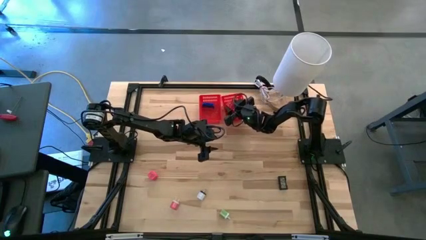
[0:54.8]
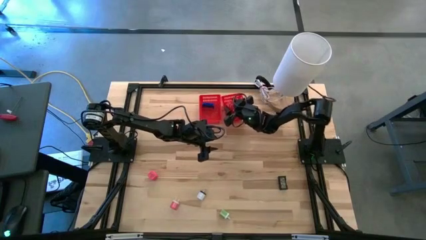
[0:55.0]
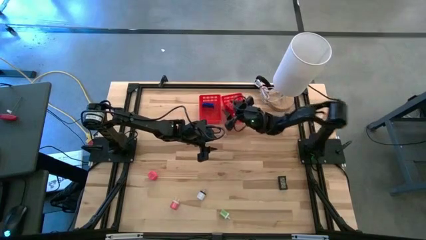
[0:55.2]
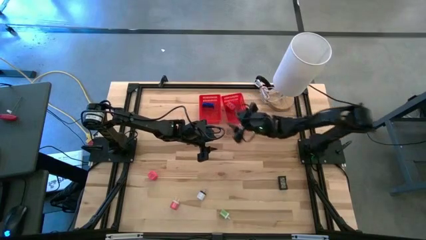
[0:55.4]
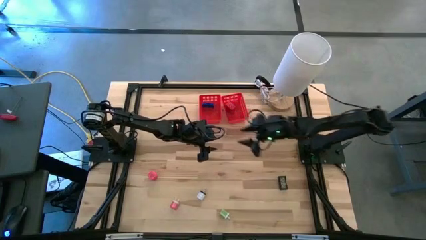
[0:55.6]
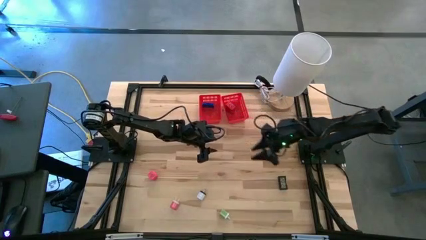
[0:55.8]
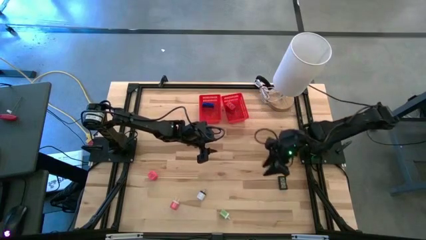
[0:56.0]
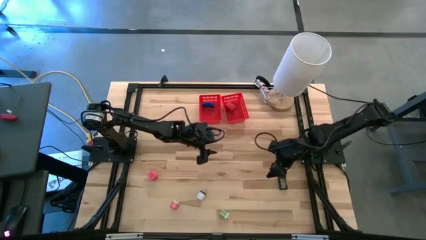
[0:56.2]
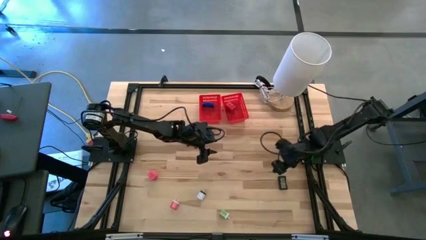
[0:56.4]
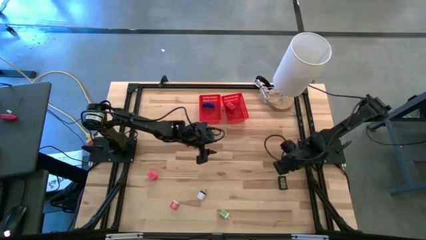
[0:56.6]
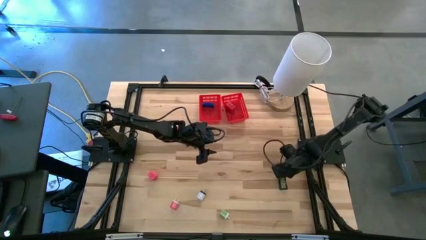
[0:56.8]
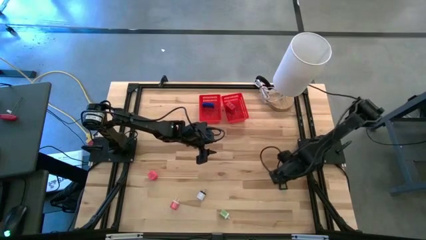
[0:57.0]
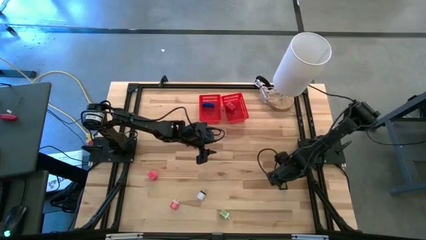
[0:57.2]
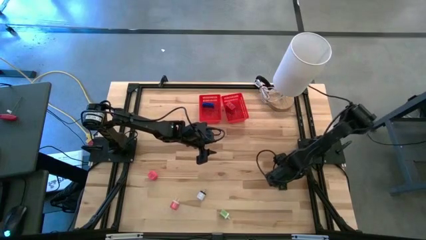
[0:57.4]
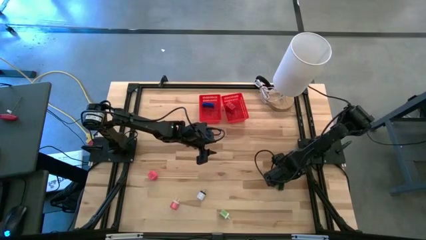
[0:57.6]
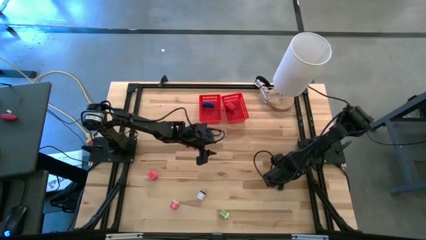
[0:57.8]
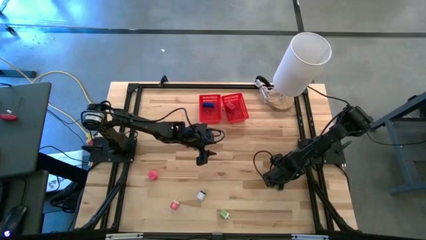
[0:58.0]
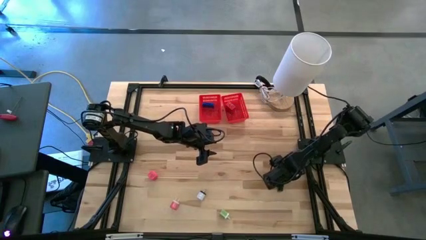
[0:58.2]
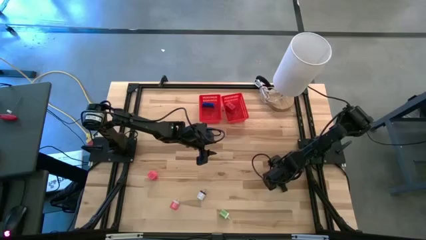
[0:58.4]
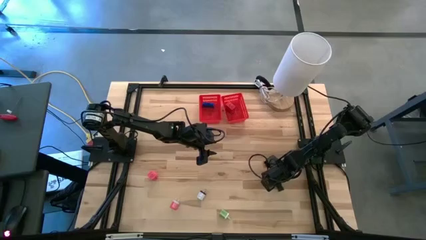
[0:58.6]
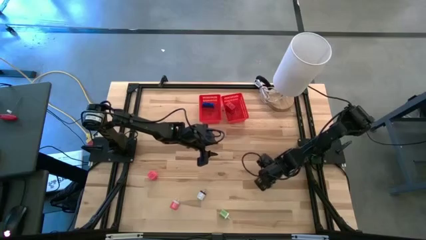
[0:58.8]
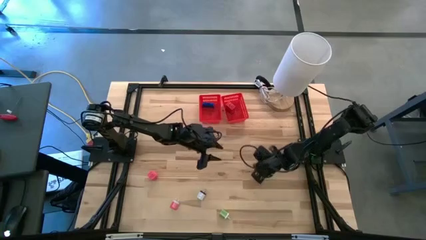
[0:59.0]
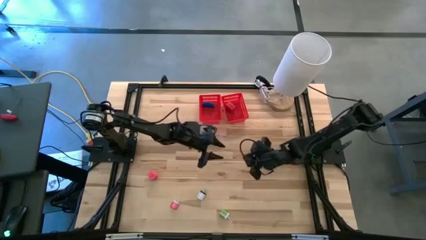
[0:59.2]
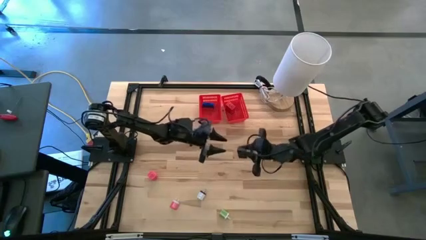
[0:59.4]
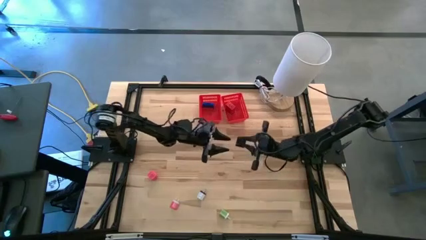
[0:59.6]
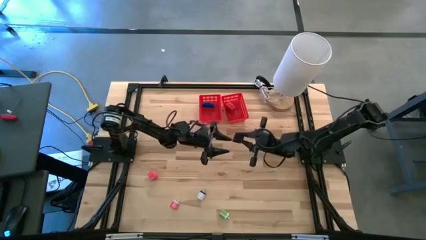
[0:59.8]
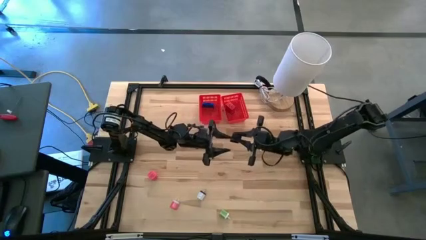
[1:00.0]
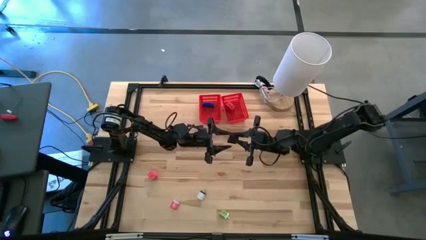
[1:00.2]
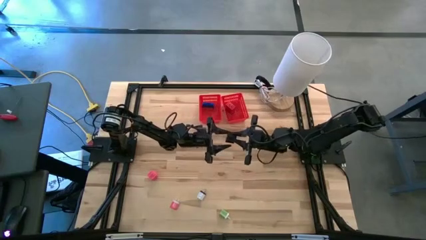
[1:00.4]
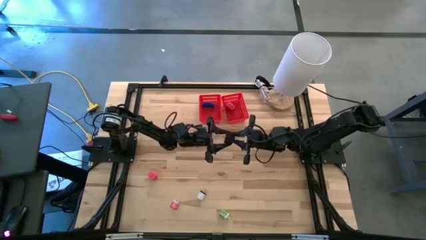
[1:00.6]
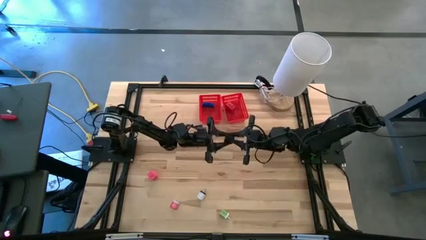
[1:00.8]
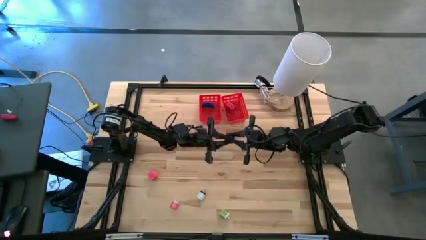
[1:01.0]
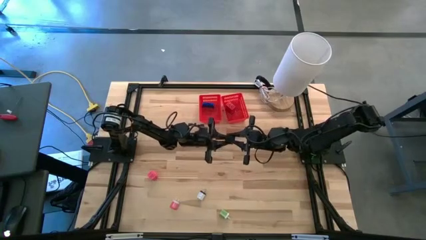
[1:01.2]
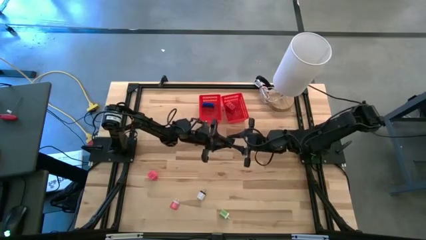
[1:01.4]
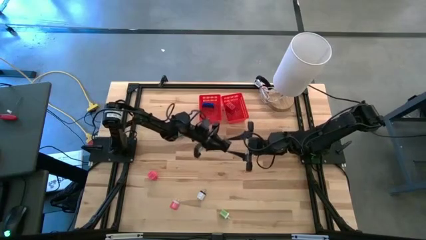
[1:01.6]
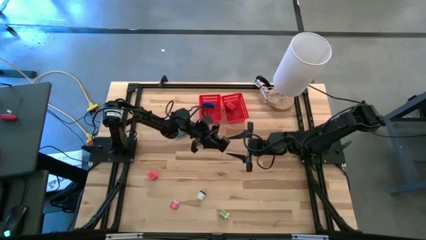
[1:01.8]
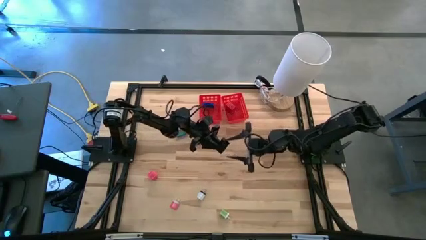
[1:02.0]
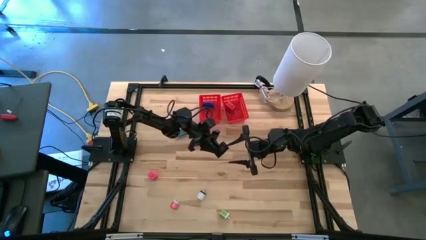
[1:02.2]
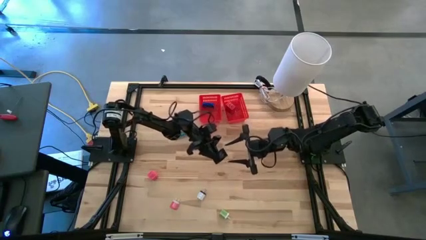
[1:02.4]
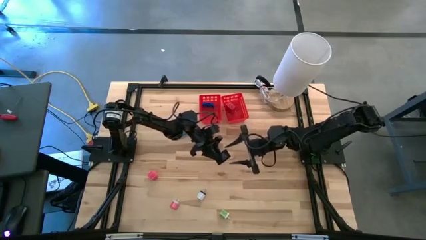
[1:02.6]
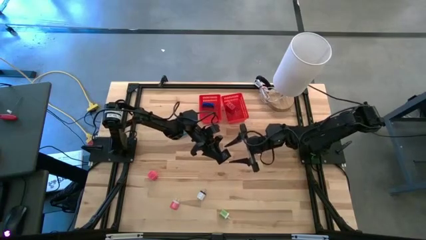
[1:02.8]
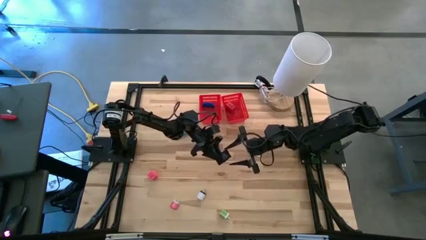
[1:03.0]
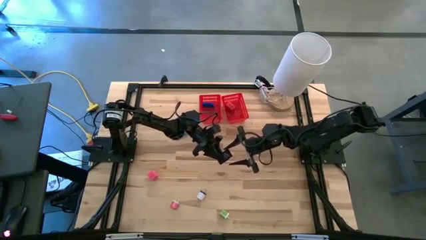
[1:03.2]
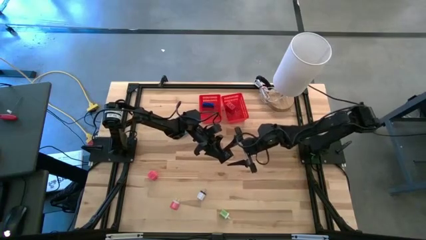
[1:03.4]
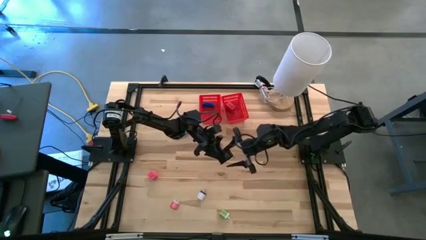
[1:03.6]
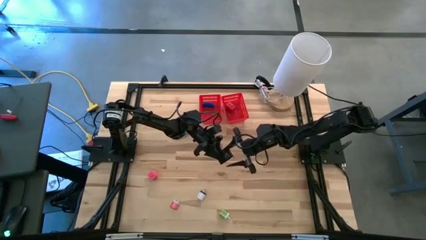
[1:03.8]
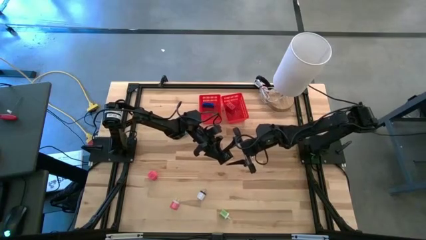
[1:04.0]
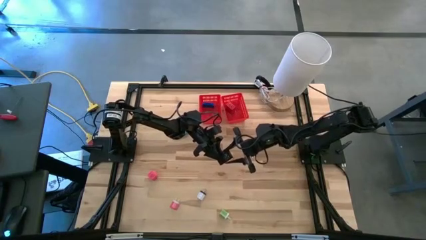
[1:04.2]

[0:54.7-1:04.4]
Task: Pick & Place Office items
Put the black digital clock into the left red bin

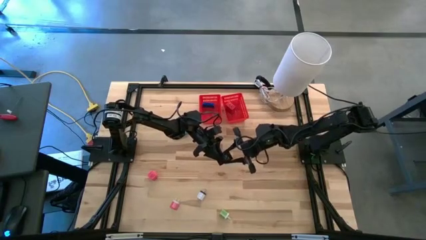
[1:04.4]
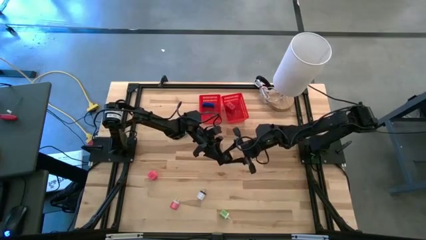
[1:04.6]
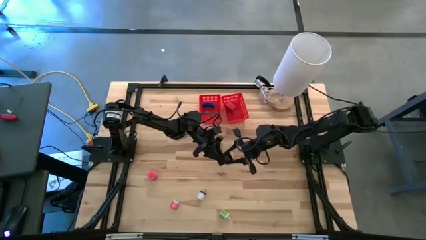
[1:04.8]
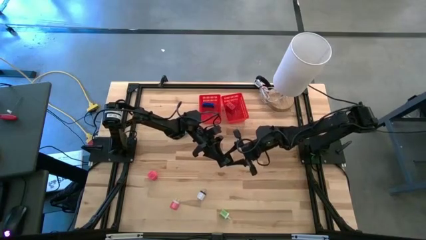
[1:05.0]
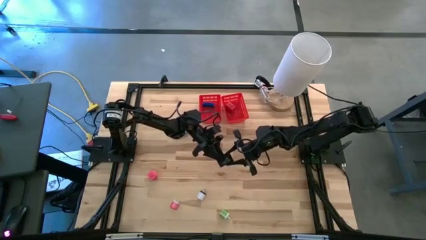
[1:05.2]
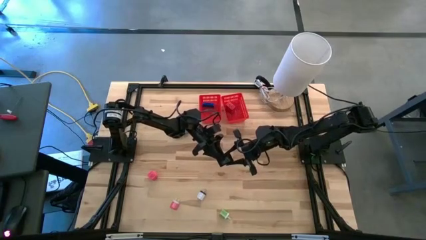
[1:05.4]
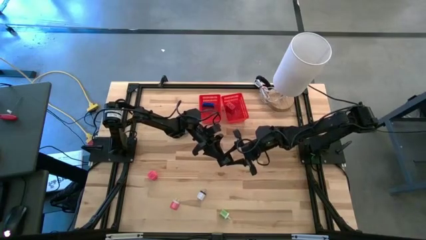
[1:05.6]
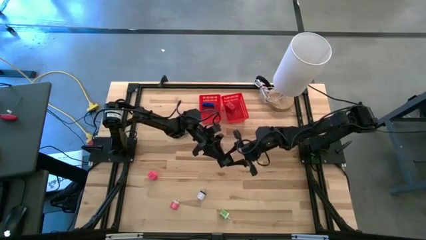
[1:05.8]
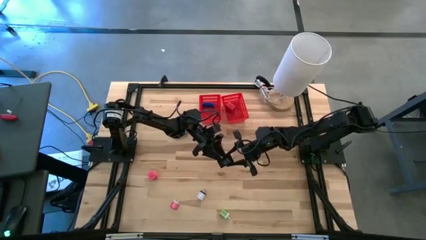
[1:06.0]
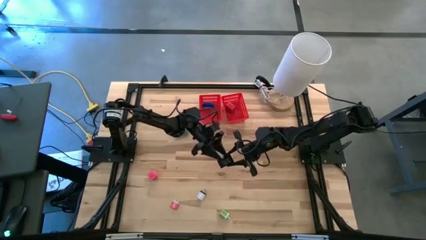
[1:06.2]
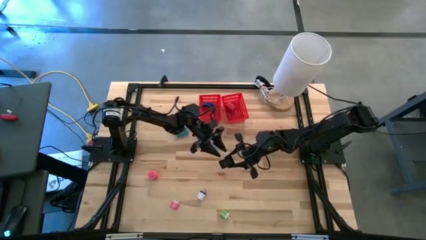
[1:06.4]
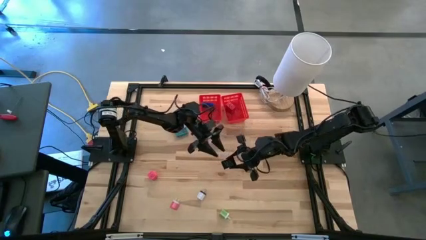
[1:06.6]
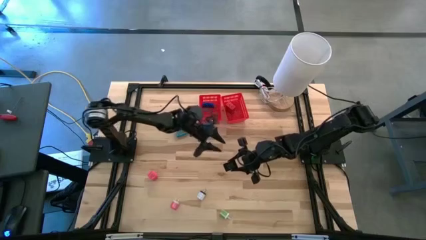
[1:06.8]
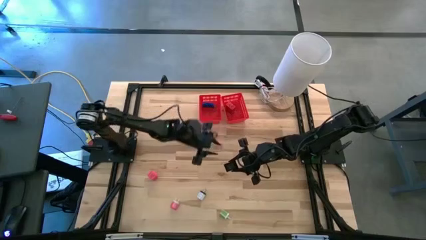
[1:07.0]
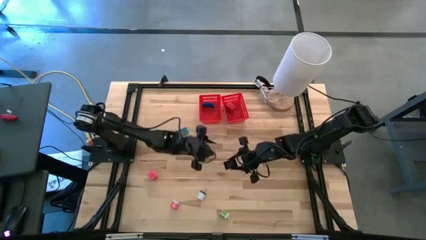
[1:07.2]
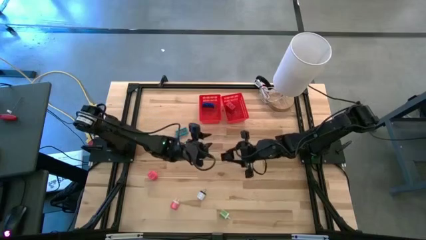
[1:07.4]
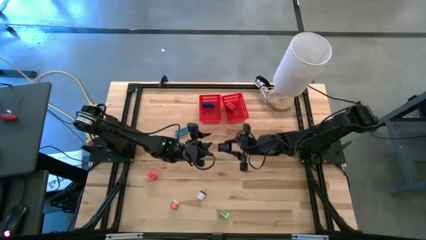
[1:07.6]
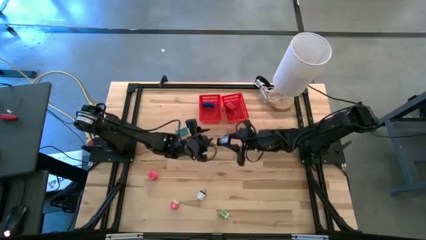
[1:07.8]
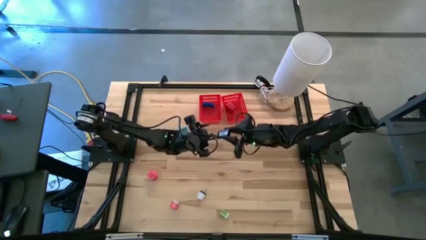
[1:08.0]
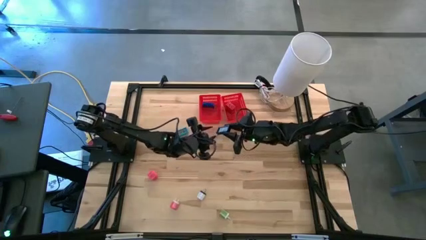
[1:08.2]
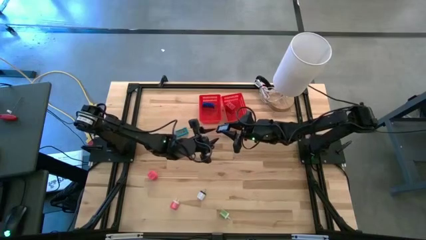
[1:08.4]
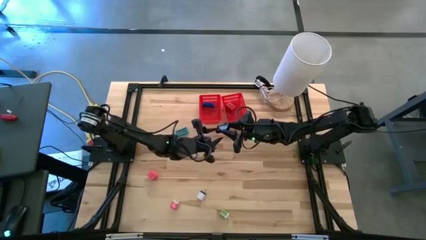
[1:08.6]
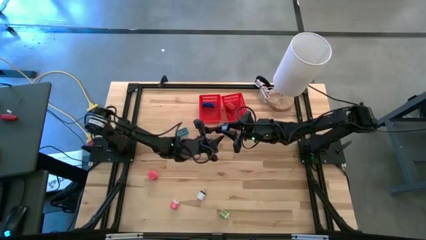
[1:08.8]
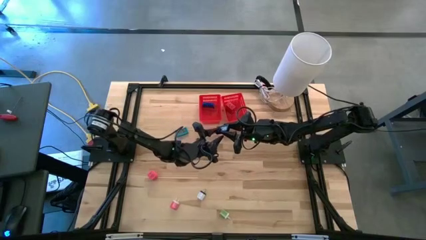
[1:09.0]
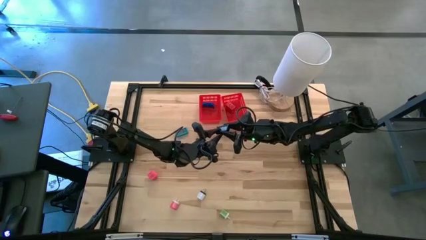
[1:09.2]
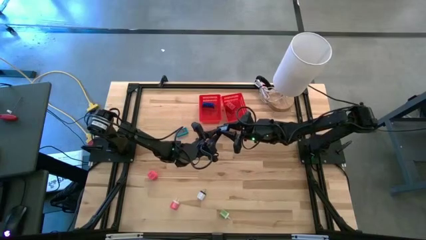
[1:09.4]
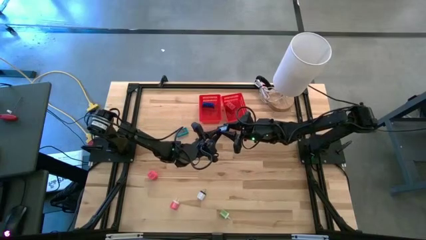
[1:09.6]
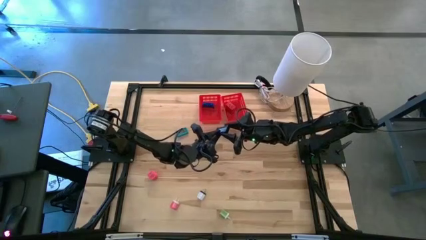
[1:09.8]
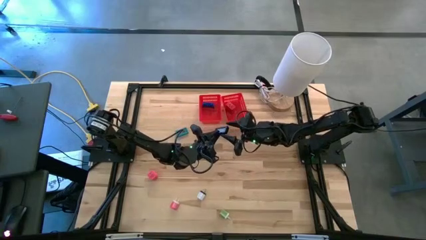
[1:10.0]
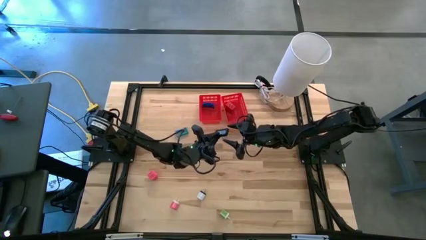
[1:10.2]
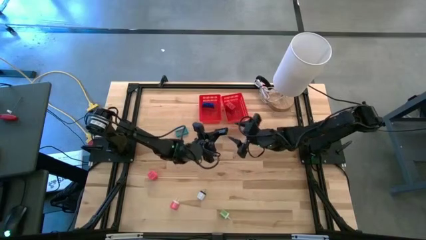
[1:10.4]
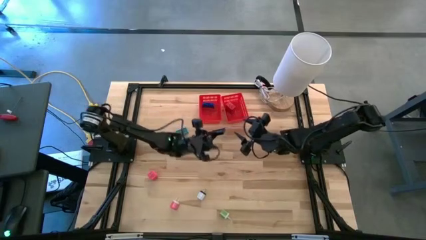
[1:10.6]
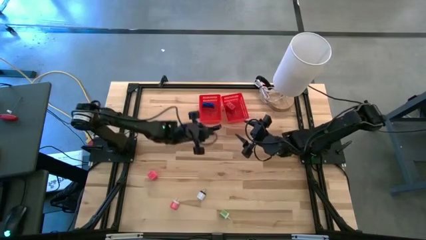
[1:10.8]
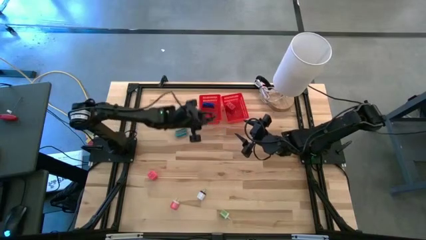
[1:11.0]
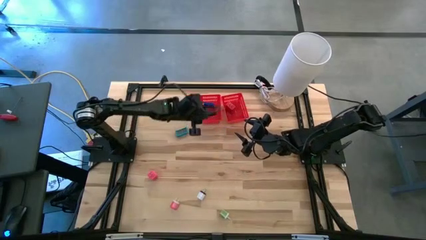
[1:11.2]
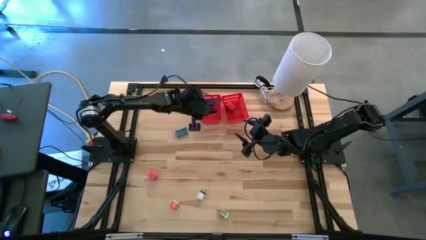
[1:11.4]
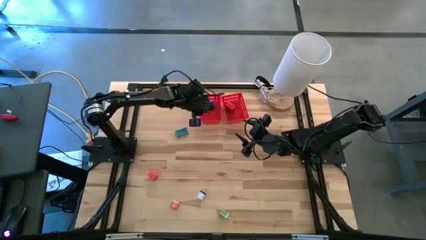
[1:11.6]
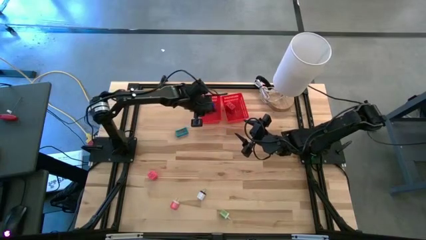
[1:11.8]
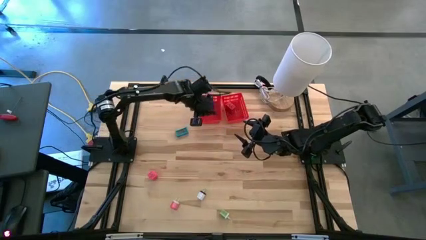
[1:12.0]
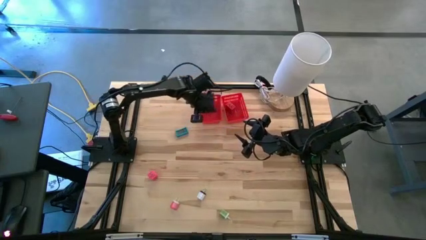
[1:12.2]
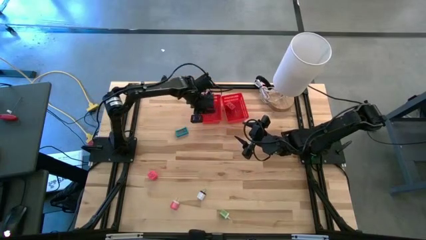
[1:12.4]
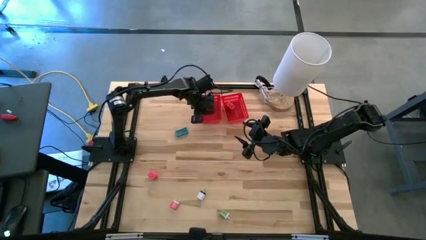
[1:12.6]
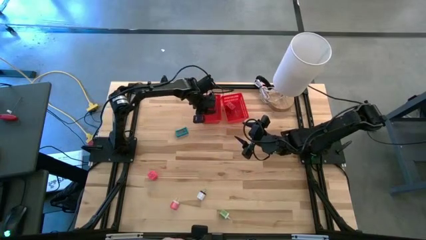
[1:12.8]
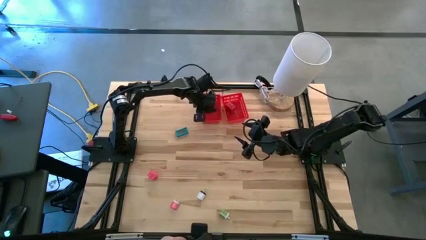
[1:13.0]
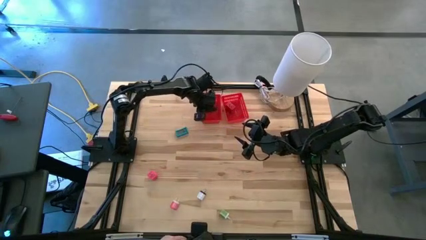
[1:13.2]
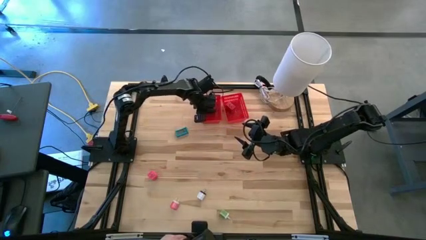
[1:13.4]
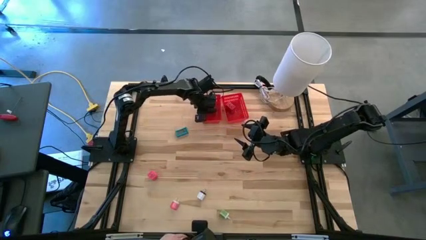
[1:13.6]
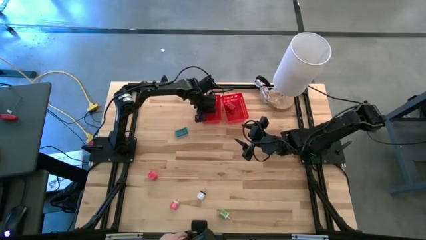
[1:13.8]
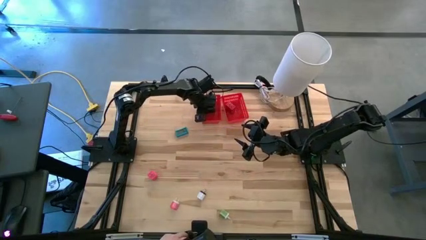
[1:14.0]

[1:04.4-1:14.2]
Put the black digital clock into the left red bin
